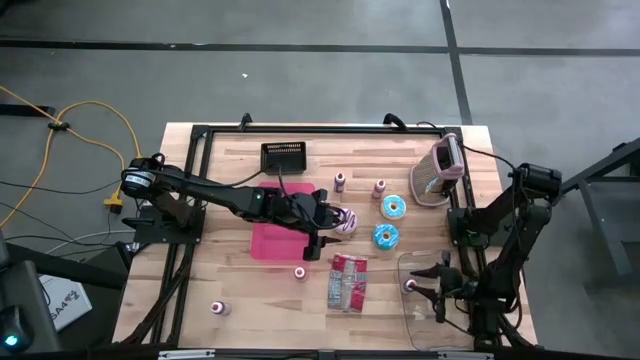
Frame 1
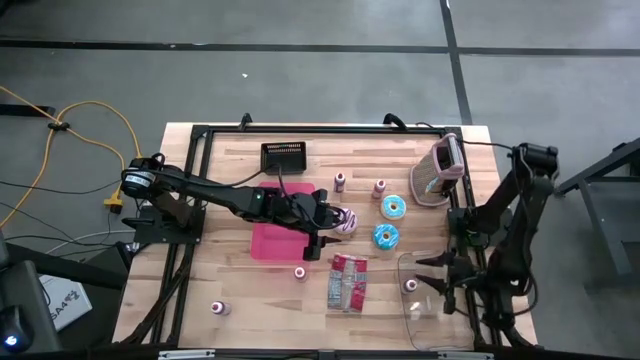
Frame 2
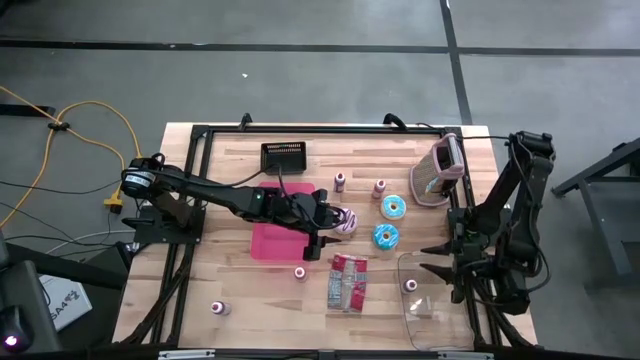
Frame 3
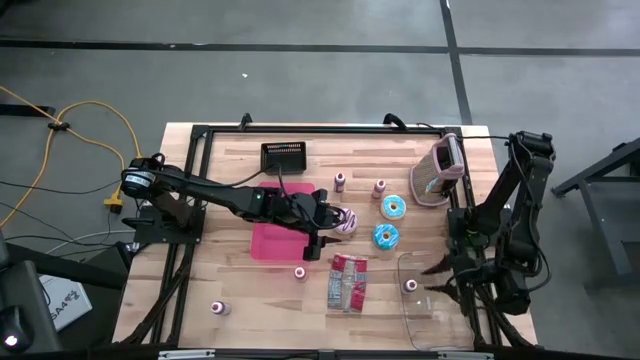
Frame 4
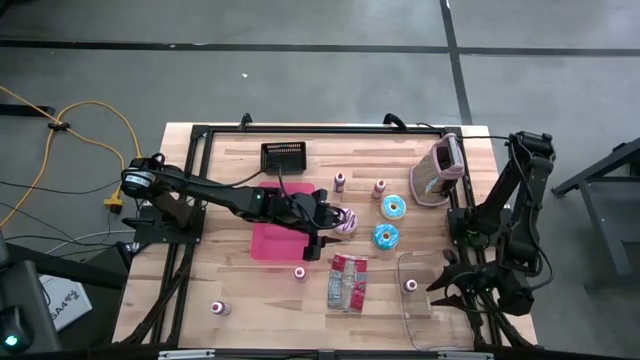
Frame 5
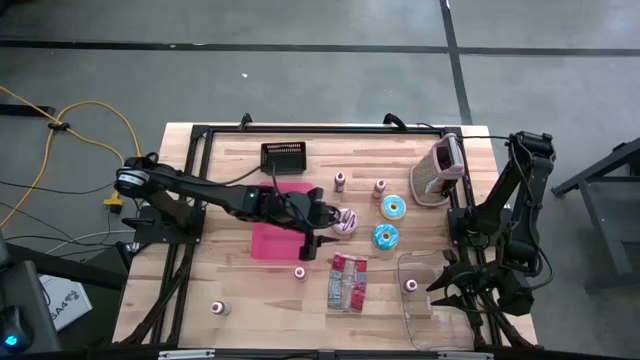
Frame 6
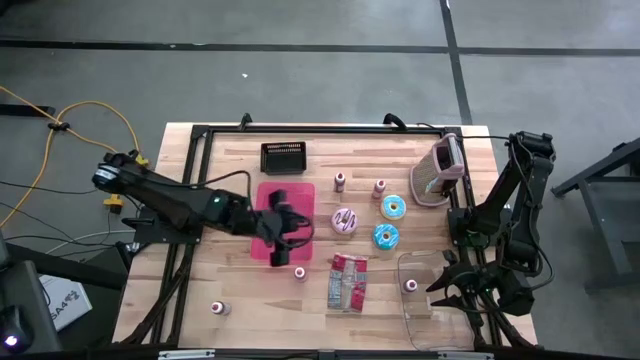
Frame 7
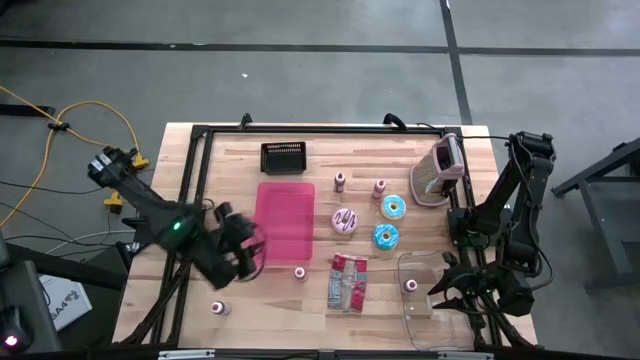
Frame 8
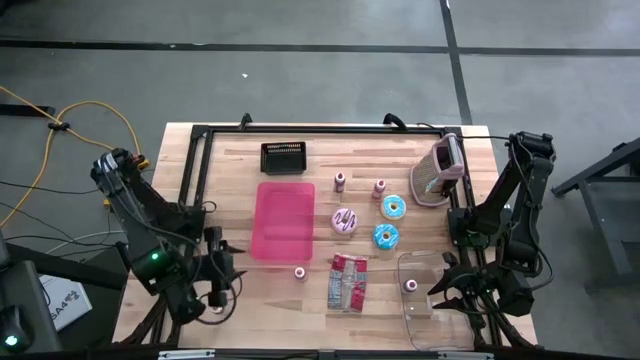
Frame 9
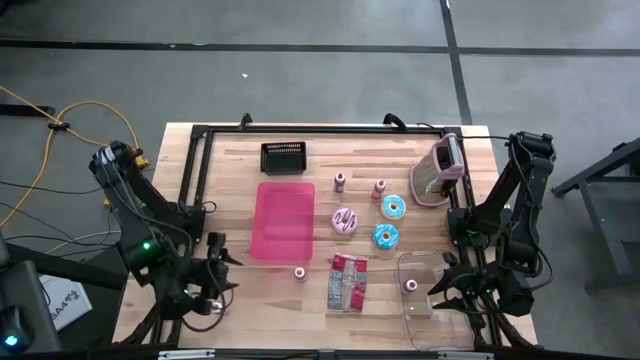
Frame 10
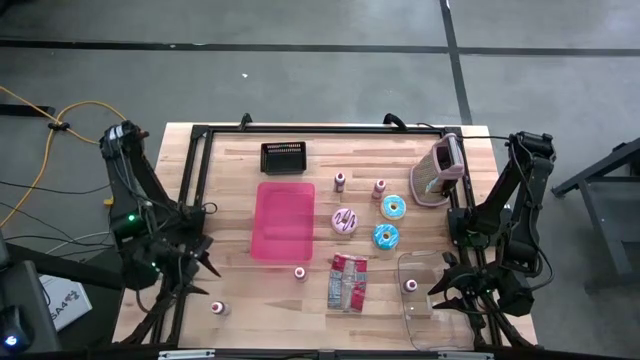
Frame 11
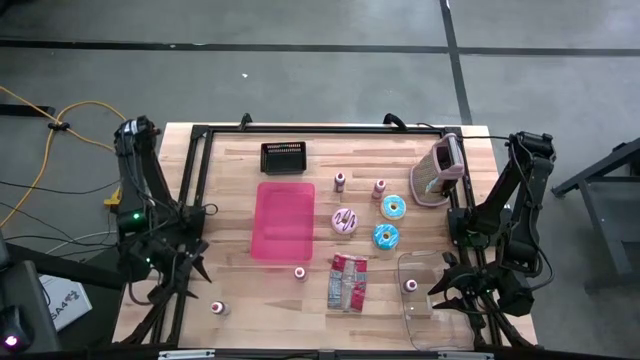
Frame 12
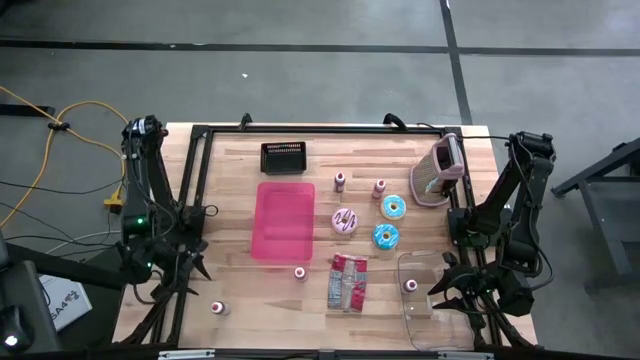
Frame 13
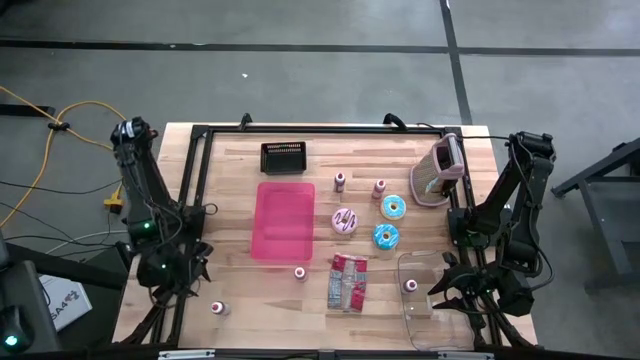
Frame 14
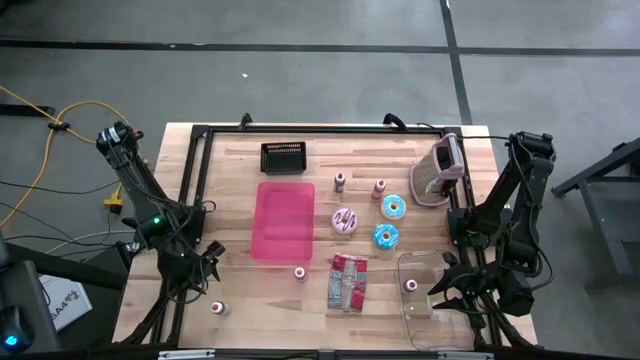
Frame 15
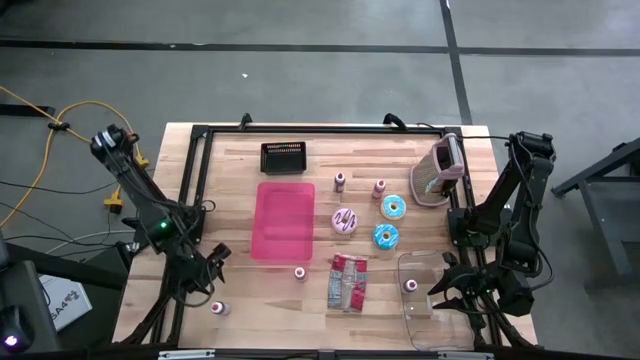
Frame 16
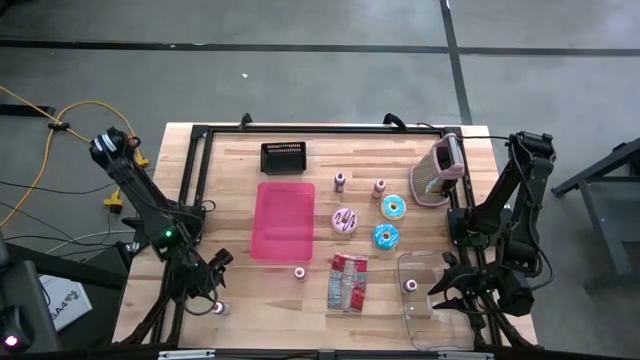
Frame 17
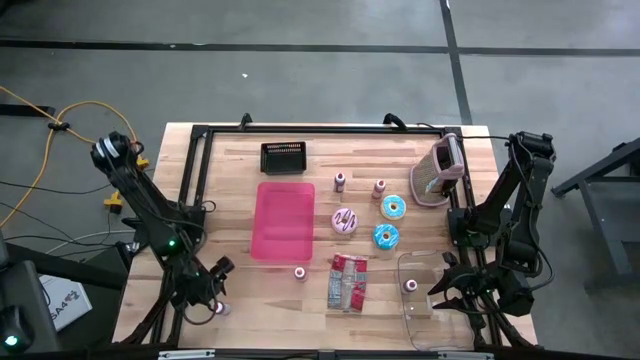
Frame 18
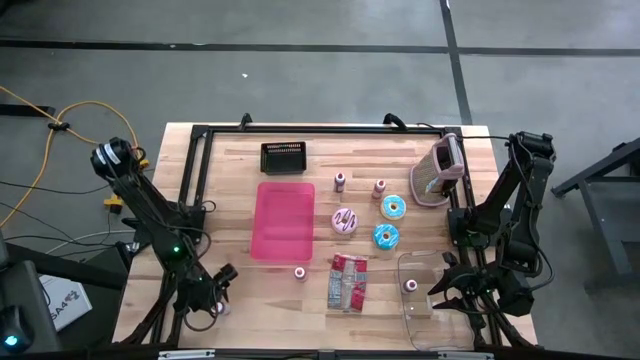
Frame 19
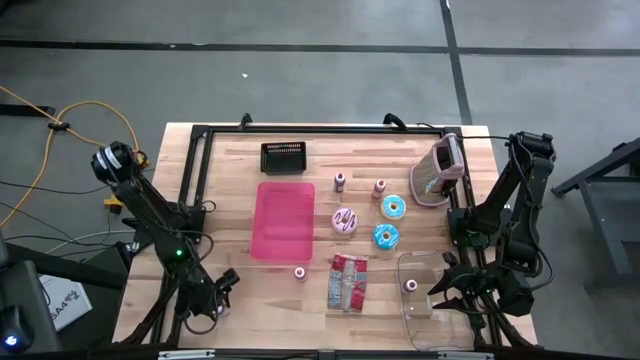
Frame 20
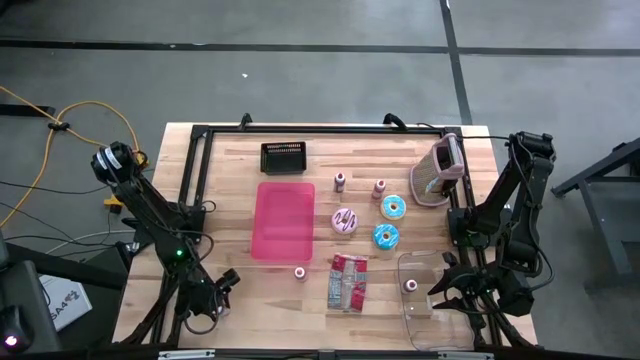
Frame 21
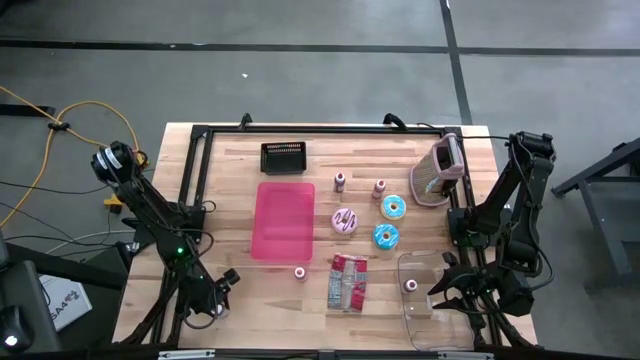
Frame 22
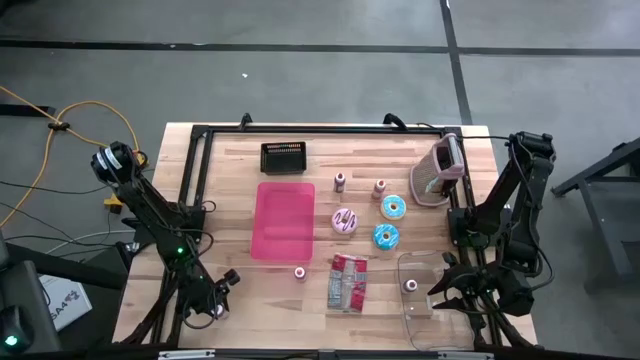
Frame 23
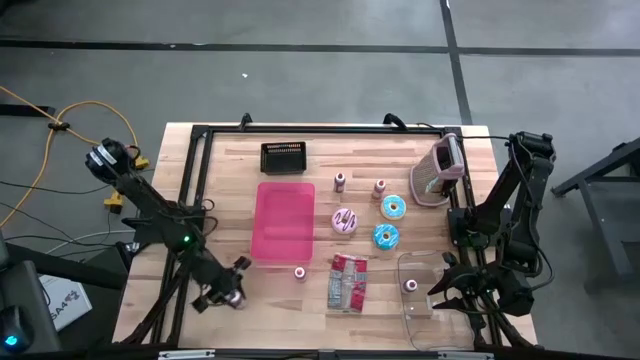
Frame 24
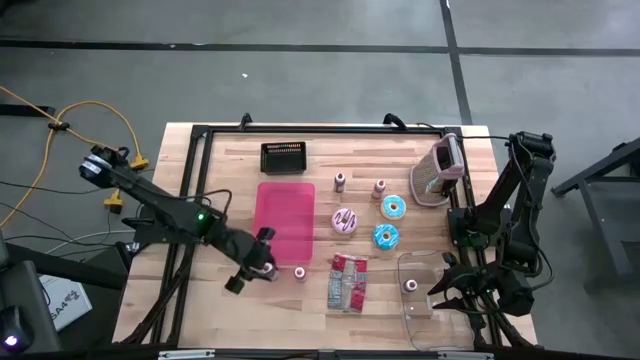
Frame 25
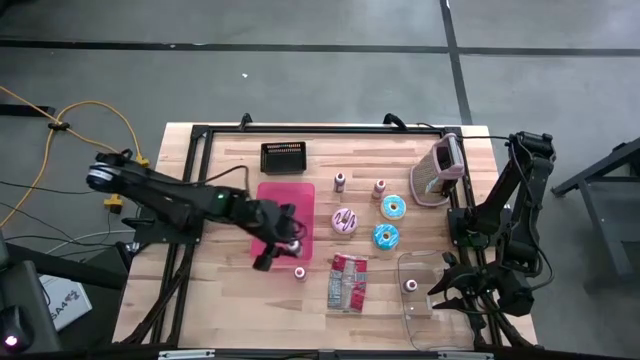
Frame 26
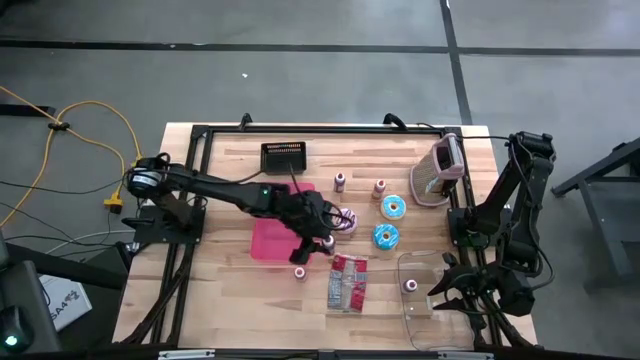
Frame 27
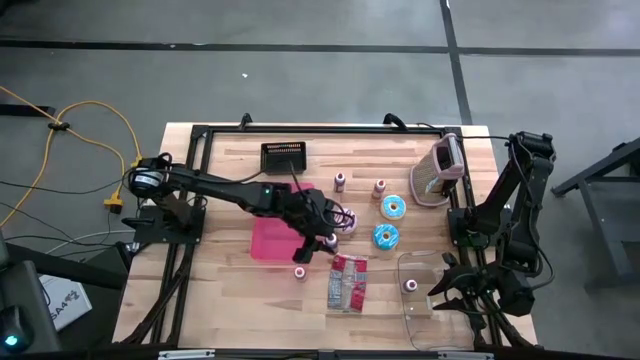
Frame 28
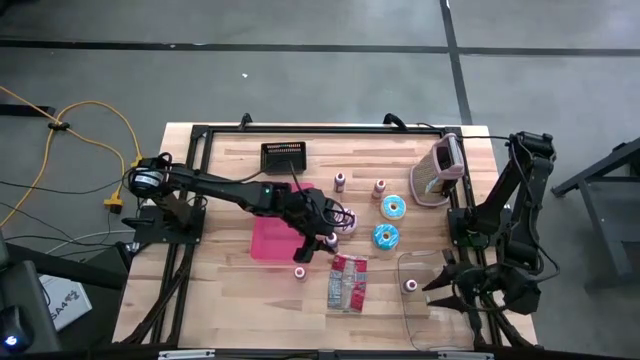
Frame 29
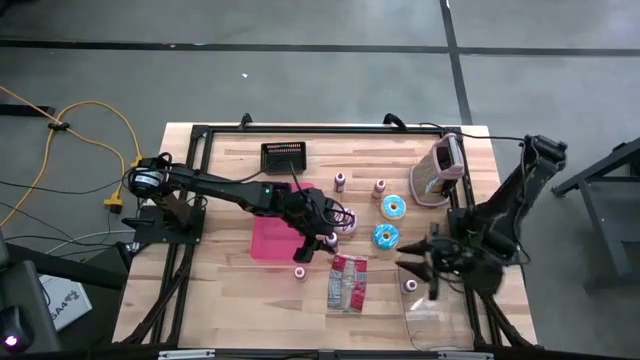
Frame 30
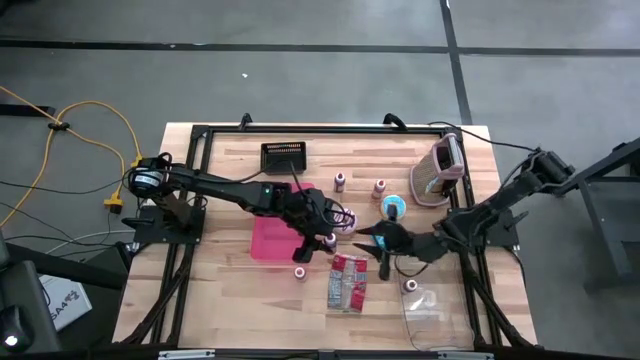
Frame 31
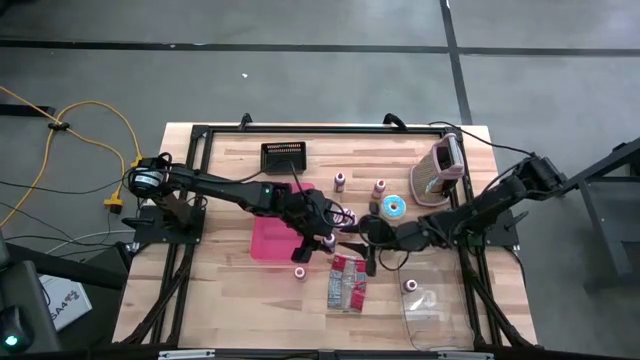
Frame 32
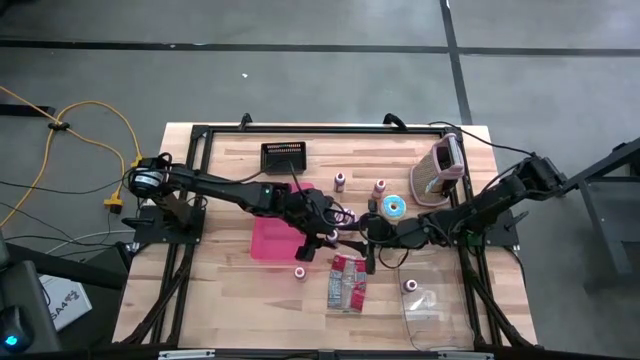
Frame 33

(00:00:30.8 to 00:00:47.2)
Put the bottom red food coloring bottle into the transparent bin

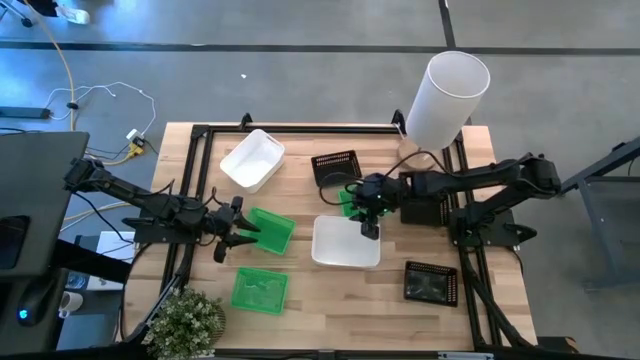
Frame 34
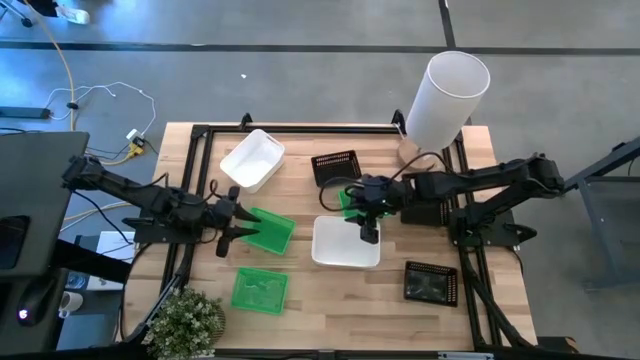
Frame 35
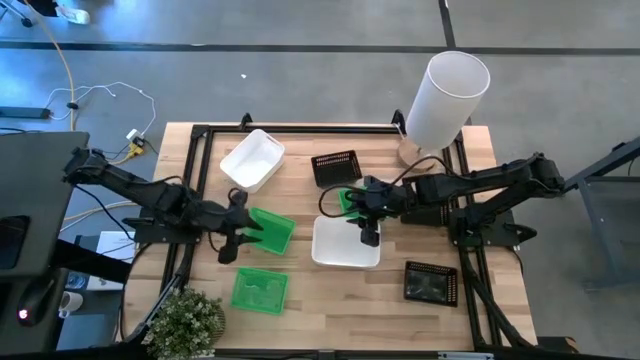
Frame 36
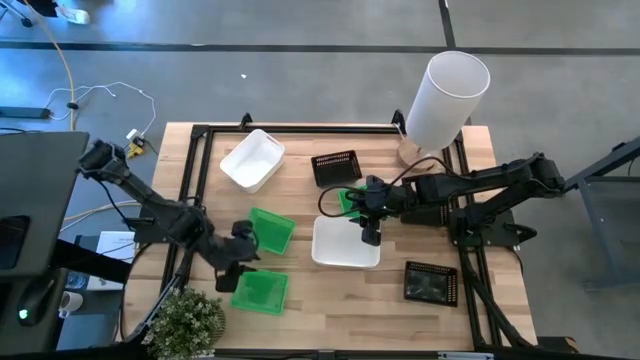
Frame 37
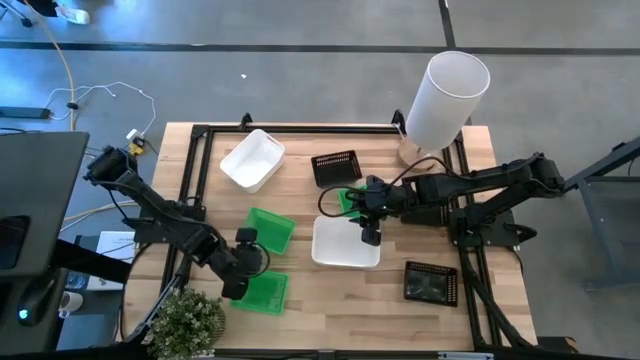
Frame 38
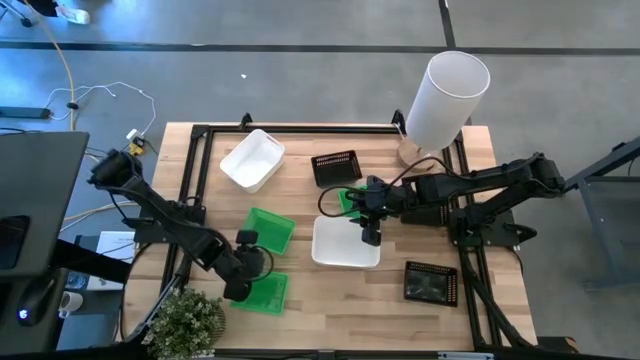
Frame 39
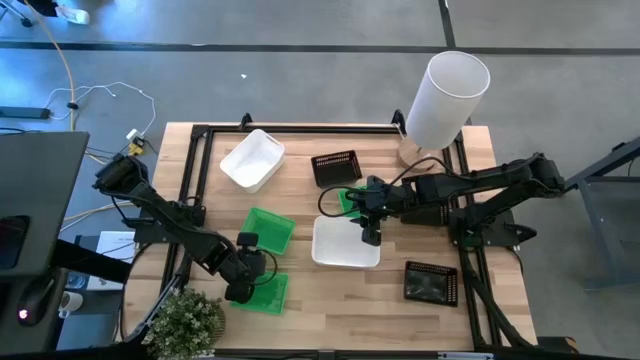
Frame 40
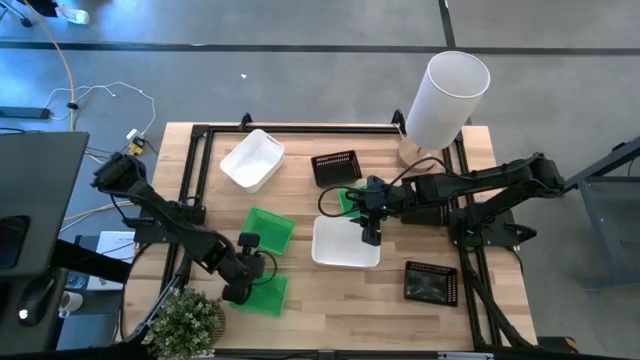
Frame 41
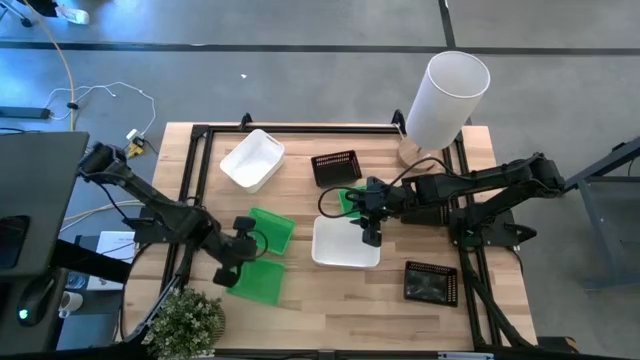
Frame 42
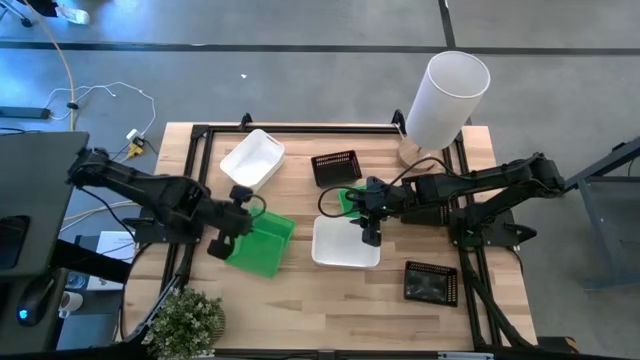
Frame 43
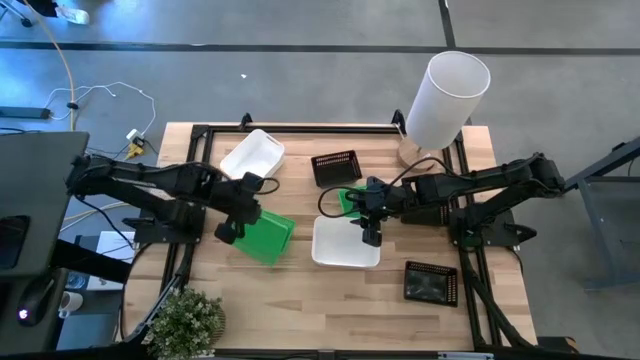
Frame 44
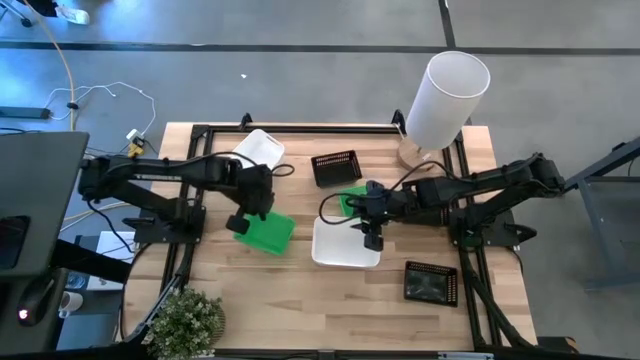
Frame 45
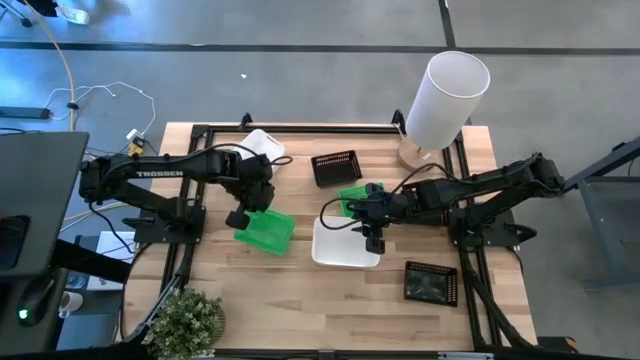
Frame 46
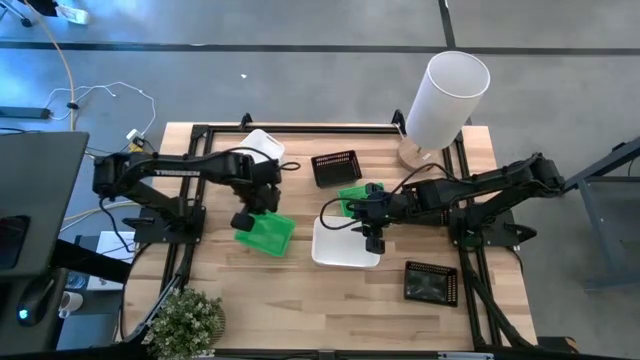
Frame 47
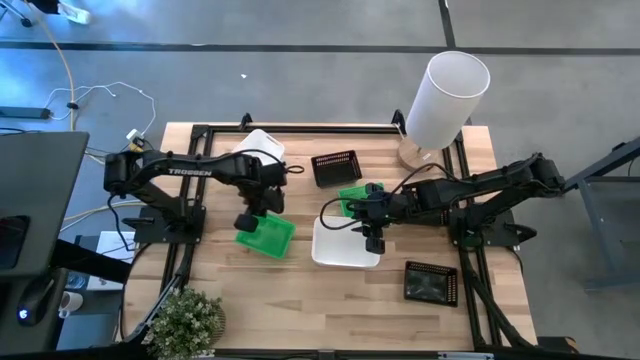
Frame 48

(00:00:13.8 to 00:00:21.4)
Stack the bottom green bin on the middle green bin
